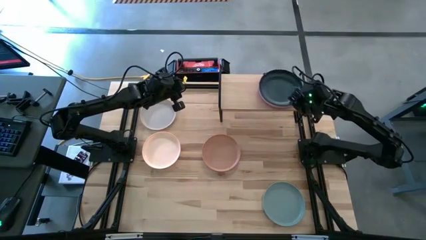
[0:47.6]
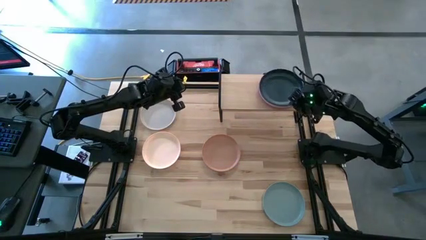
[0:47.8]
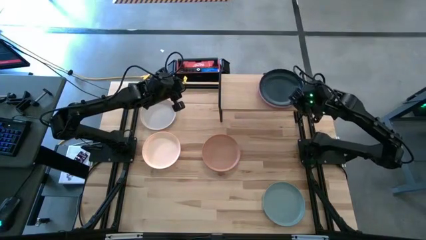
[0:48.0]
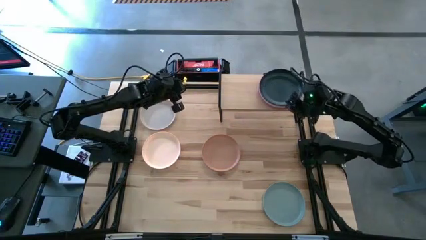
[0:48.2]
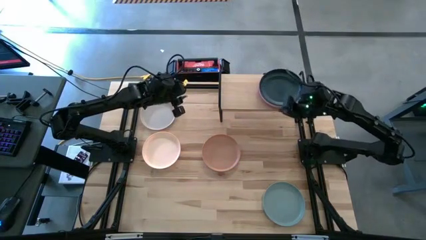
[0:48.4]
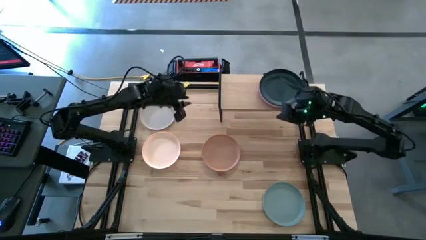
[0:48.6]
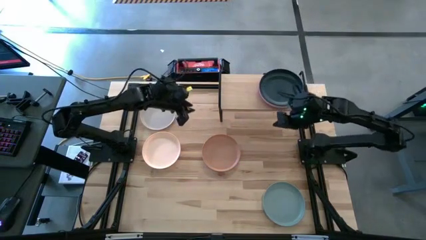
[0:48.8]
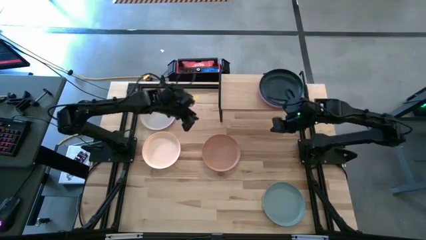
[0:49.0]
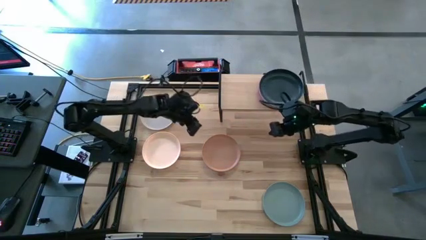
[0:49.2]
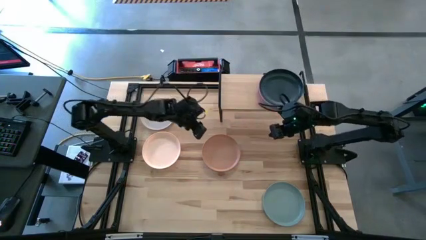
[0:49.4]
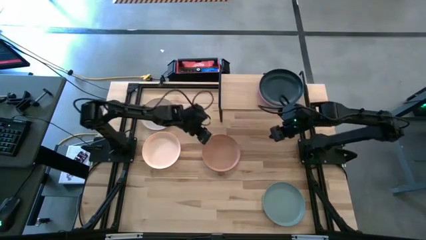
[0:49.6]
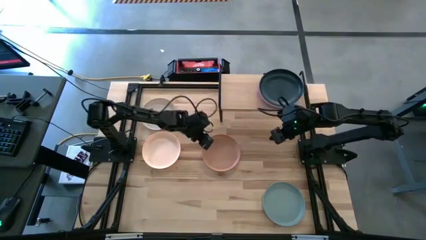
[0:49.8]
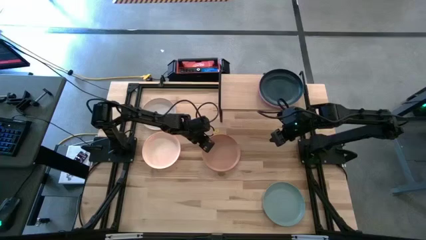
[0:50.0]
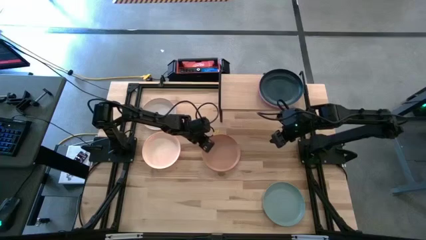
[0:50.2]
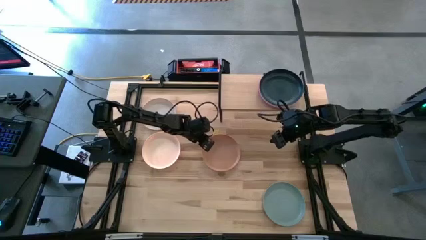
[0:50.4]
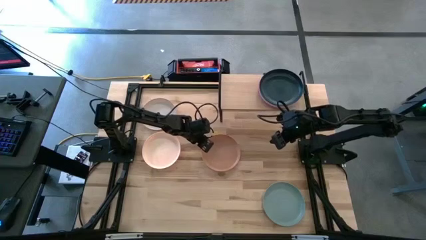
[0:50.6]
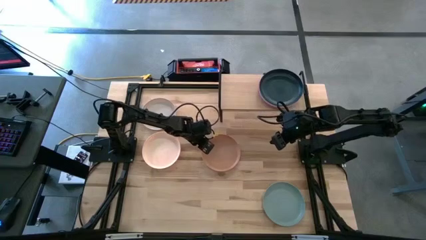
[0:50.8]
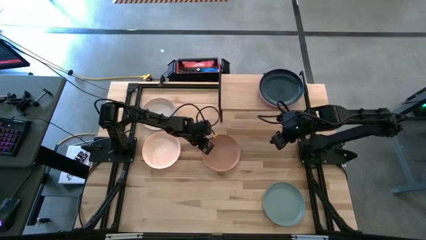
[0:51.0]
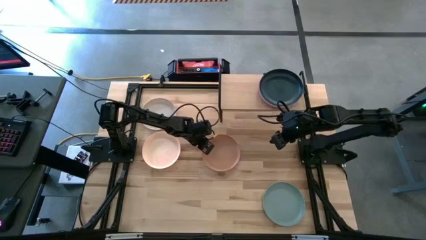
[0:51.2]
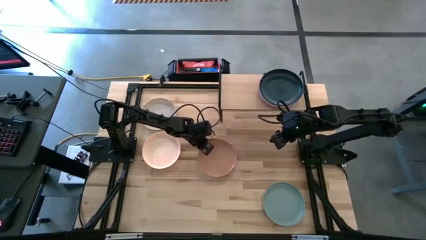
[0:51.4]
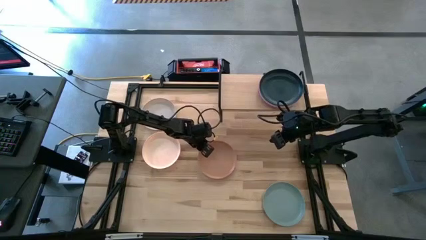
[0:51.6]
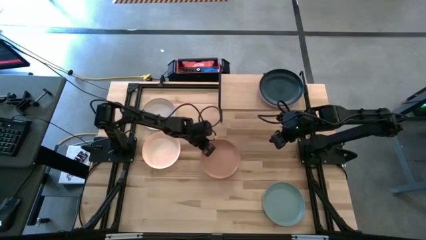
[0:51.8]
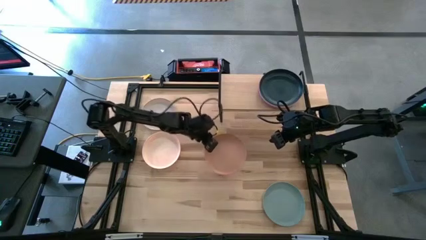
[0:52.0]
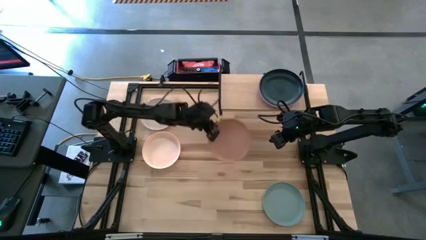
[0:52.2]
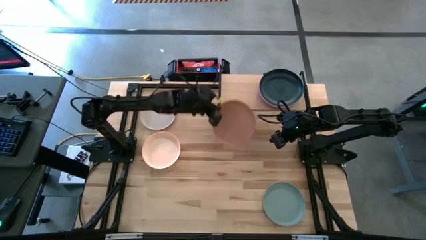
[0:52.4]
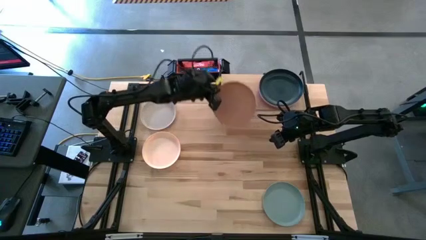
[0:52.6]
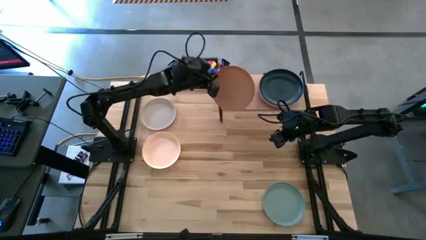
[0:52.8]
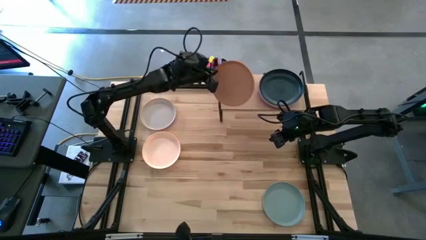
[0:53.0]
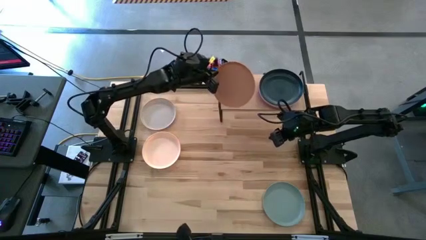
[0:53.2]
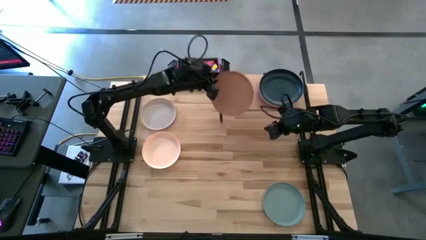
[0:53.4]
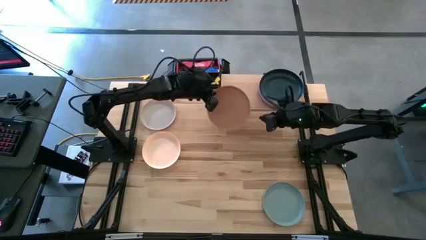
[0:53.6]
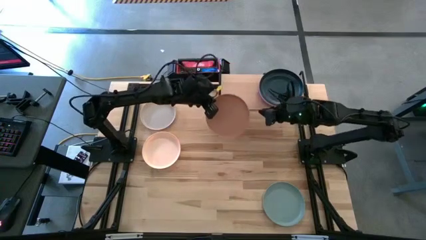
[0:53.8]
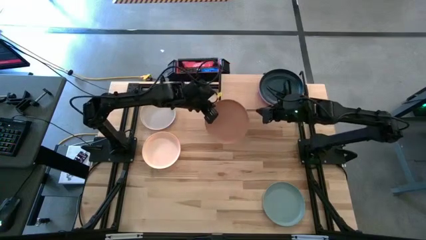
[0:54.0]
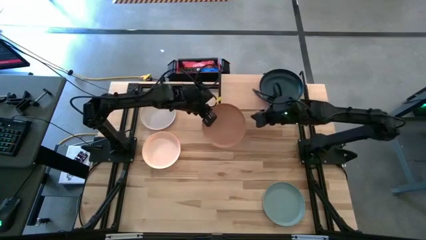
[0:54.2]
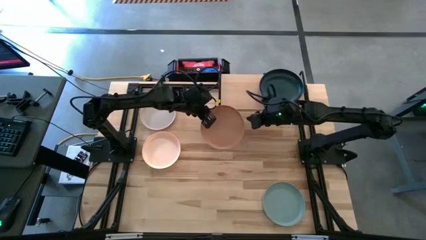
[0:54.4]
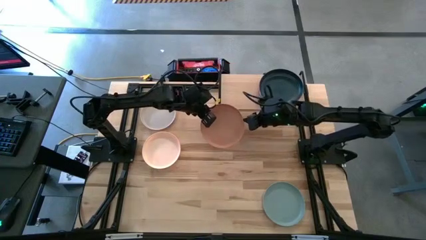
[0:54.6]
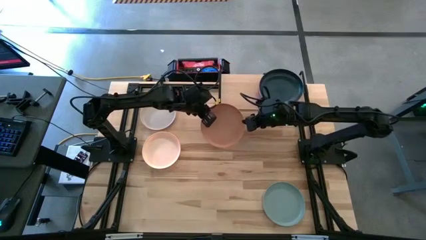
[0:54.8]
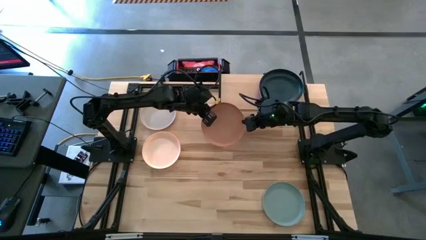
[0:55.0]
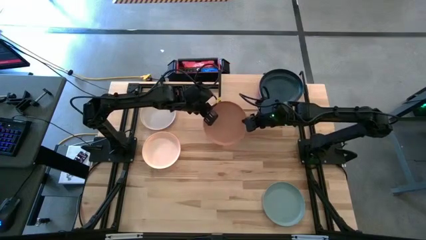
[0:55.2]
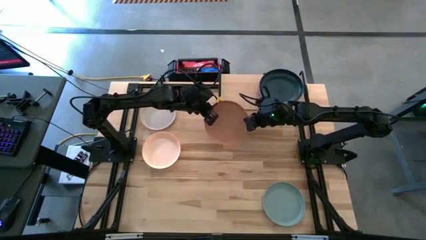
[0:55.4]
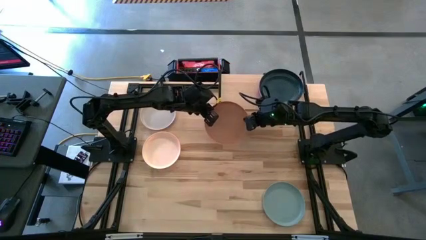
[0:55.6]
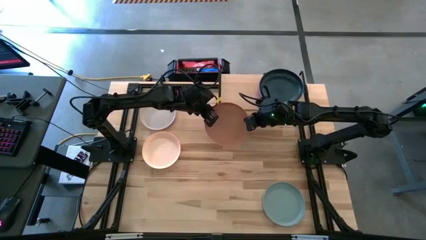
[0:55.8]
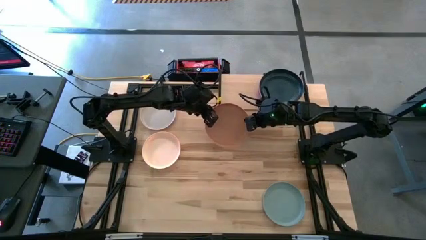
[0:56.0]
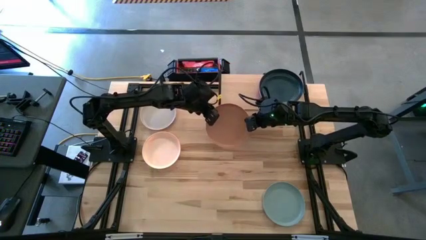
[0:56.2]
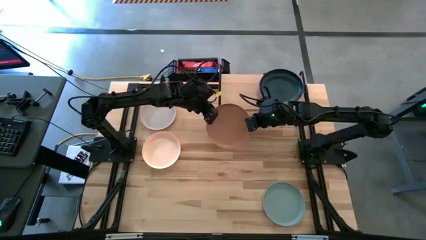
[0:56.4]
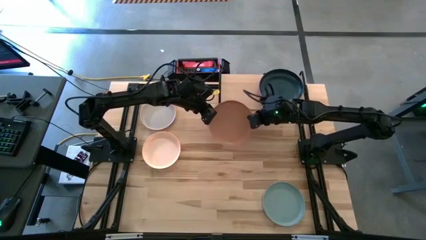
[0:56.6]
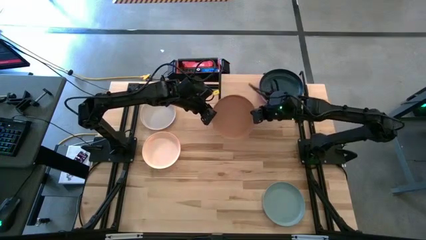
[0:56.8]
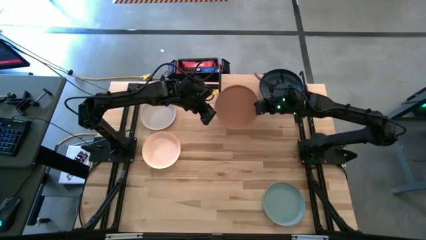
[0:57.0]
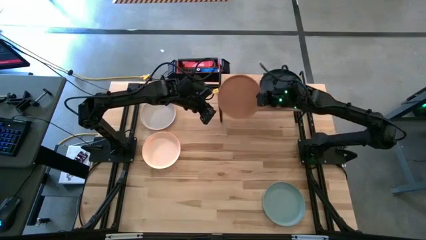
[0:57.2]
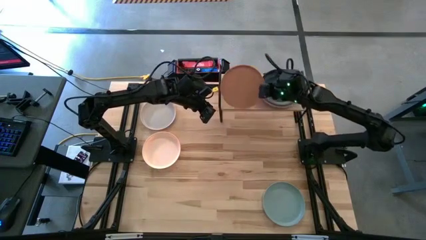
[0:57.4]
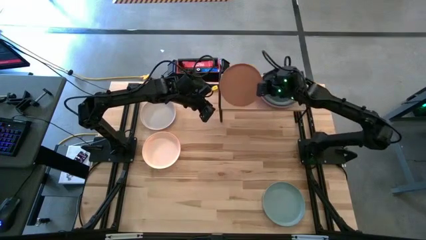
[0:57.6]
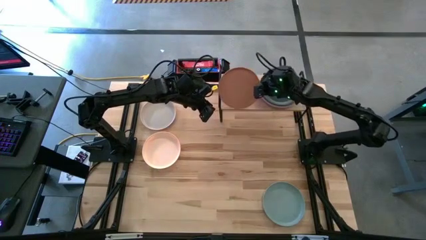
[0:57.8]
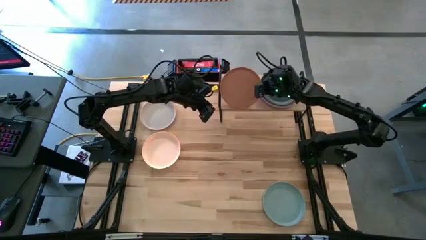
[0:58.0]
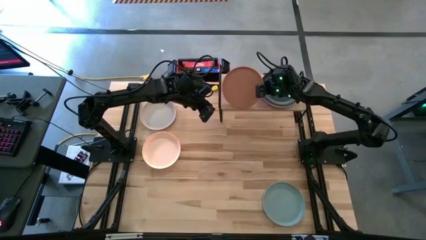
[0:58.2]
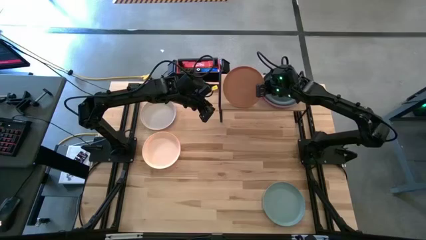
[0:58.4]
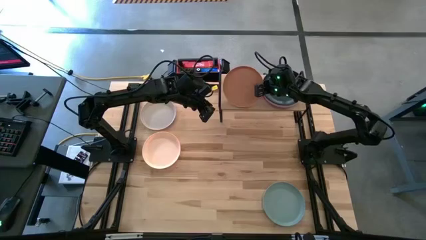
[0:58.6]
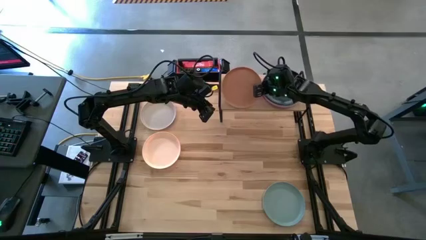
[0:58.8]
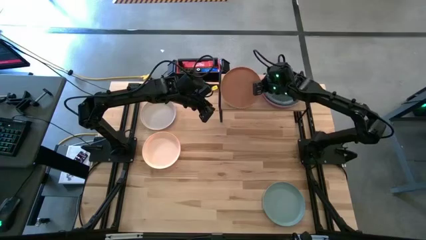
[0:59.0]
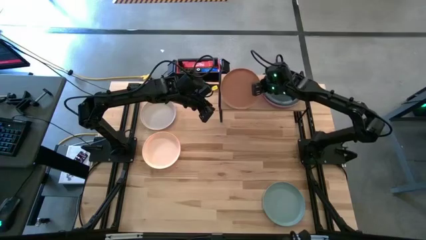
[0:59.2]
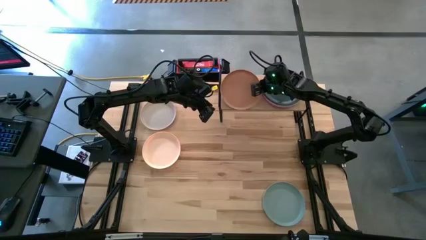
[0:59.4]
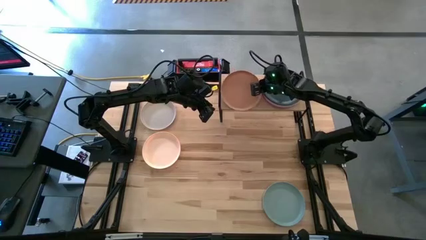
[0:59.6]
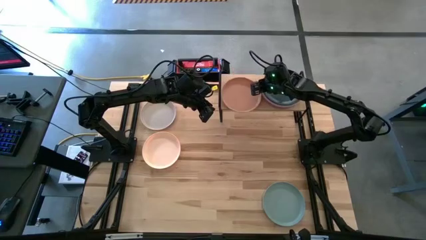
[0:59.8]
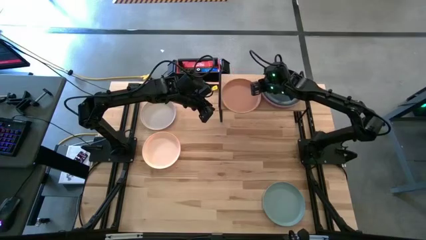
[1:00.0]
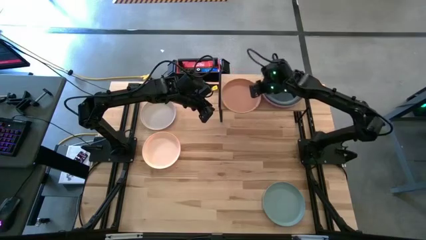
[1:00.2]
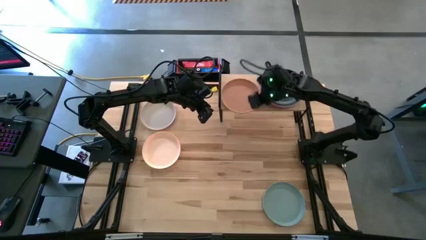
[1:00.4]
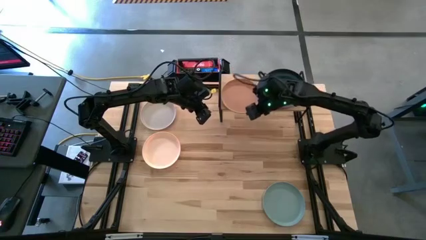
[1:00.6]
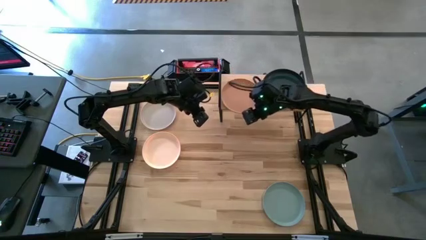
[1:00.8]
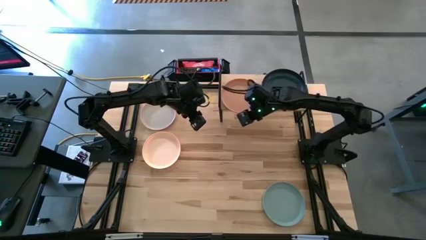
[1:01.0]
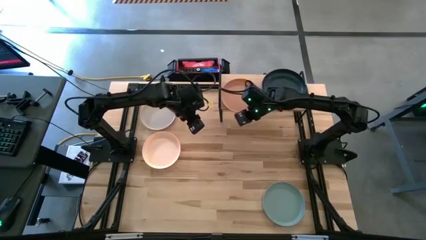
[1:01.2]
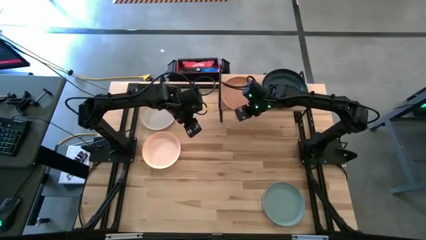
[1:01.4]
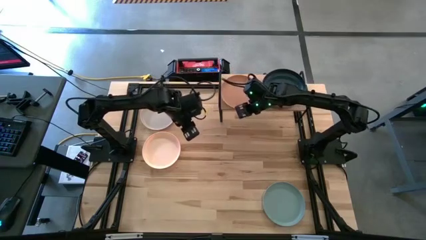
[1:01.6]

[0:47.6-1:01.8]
Task: Place and stack plates onto a shelf
Put the brown plate on the shelf

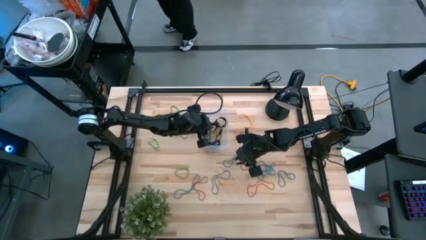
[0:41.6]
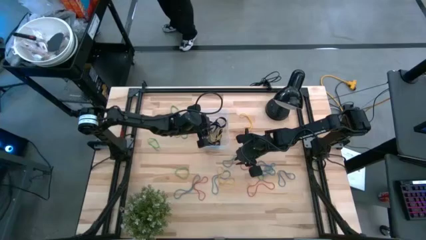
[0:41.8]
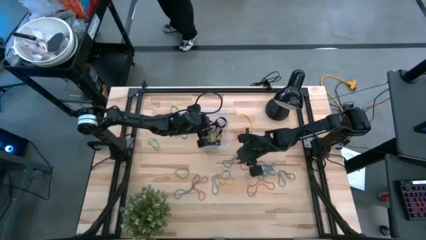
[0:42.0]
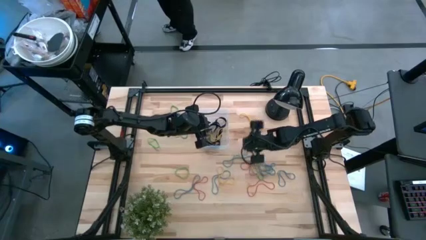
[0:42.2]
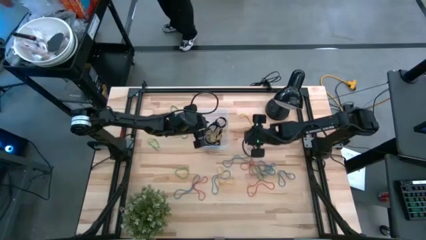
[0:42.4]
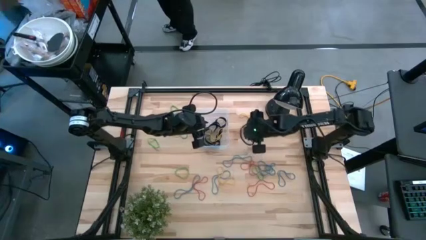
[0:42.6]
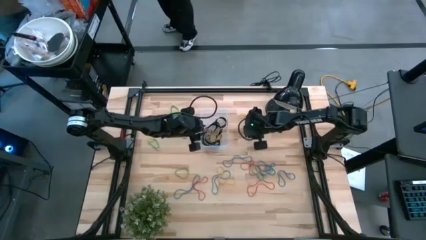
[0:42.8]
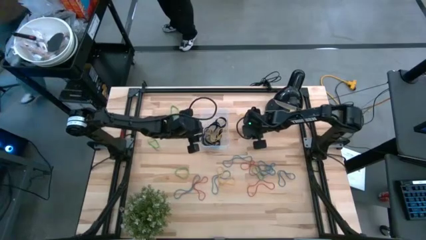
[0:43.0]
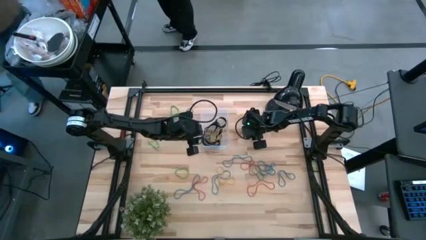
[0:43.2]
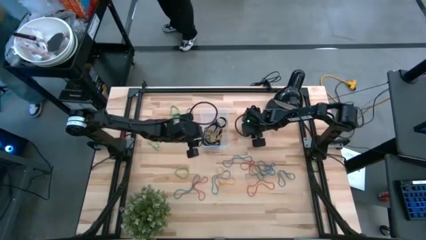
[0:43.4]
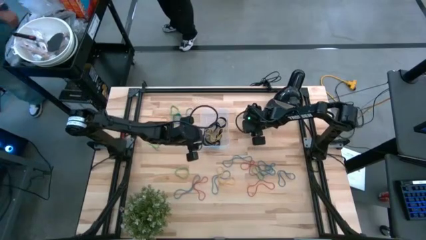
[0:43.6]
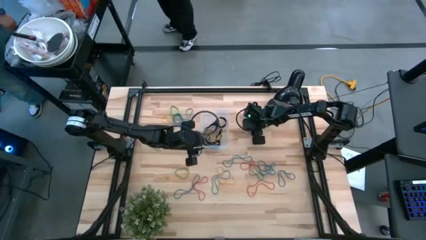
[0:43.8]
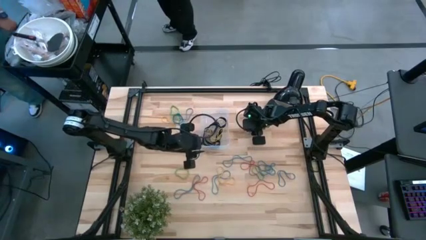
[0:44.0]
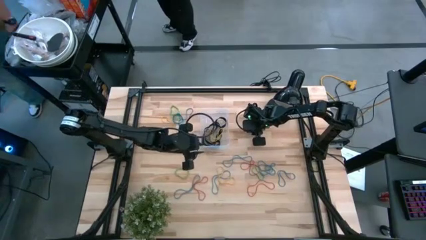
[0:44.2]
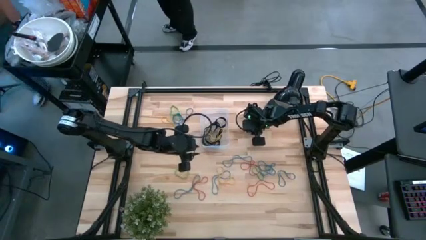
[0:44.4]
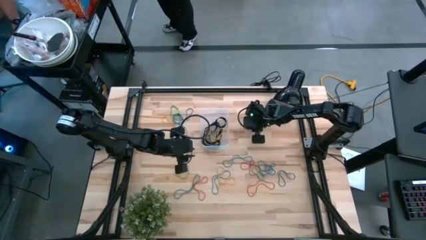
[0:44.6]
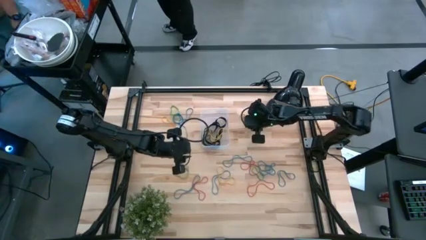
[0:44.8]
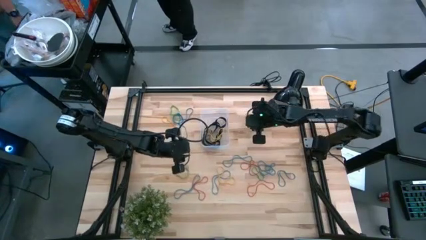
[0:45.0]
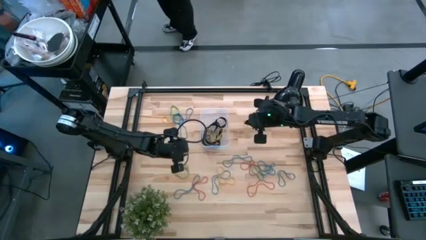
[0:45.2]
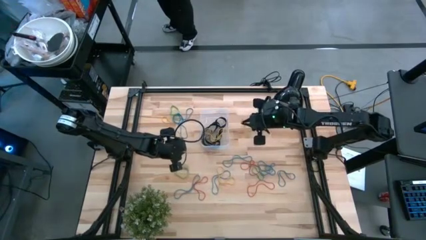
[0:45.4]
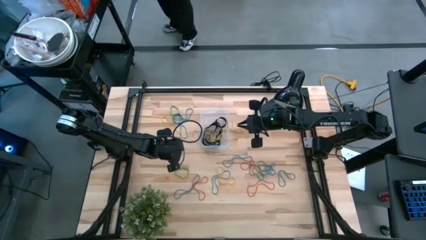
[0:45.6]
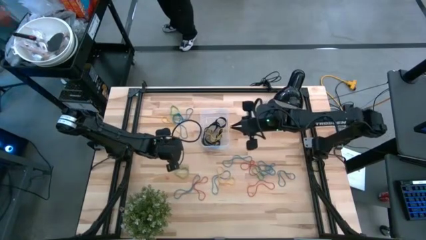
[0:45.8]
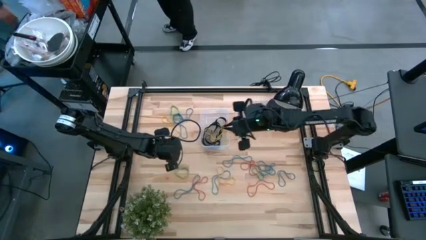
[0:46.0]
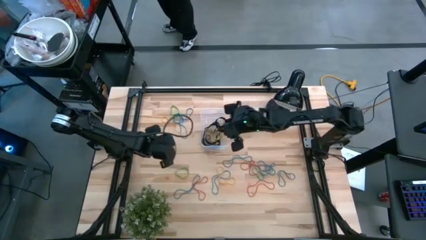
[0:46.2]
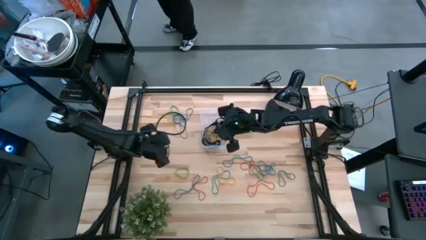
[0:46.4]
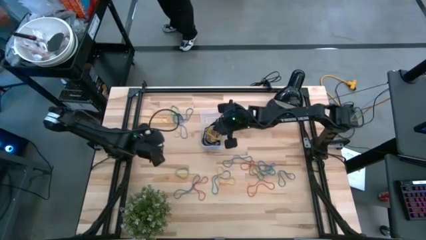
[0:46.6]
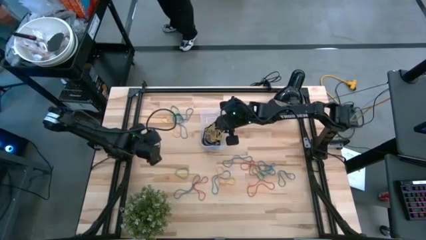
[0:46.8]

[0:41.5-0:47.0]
Task: Pick and place rubber bands into bin
Put the yellow rubber band into the transparent bin
